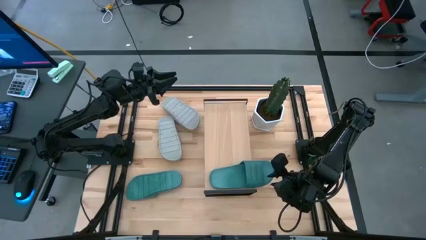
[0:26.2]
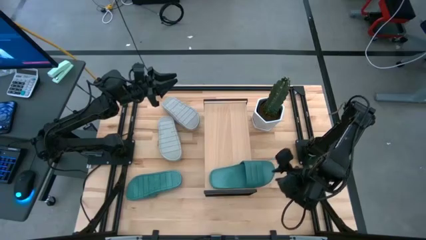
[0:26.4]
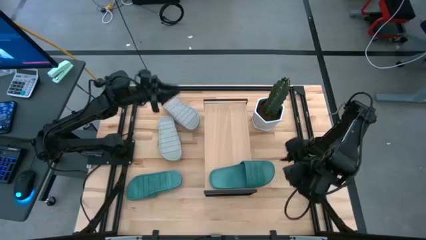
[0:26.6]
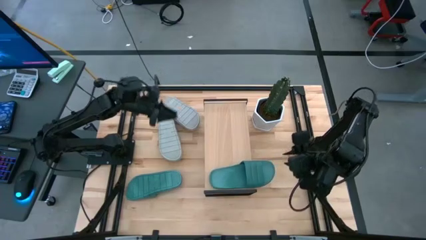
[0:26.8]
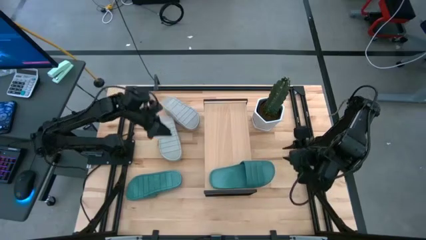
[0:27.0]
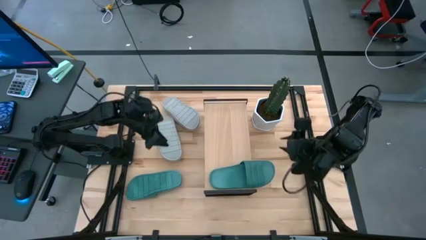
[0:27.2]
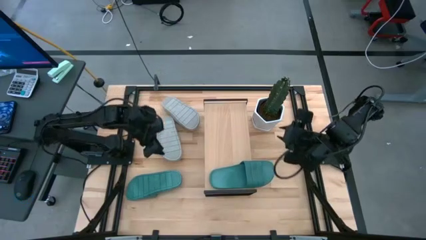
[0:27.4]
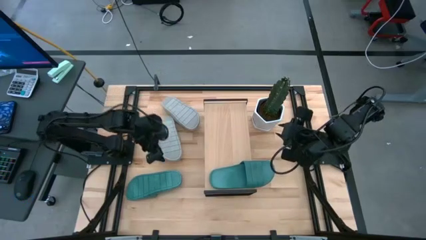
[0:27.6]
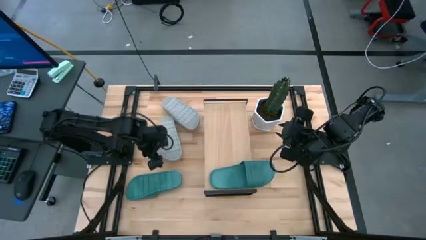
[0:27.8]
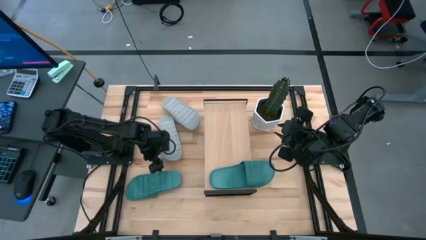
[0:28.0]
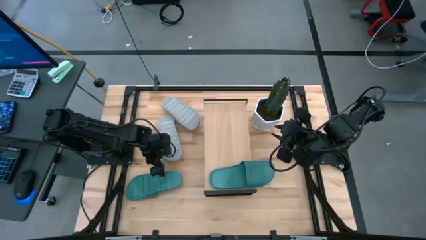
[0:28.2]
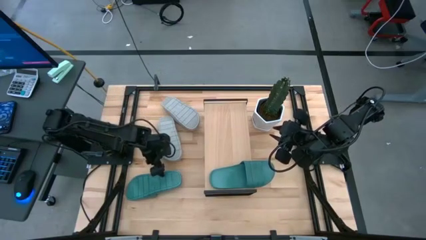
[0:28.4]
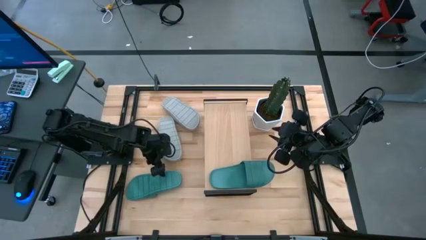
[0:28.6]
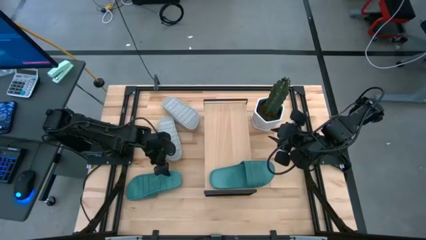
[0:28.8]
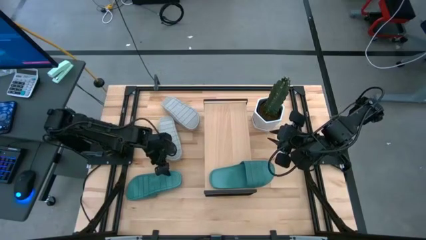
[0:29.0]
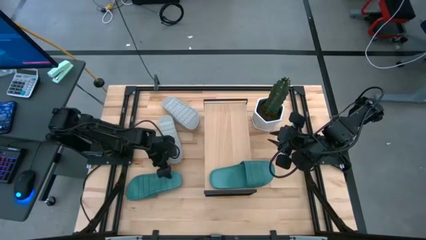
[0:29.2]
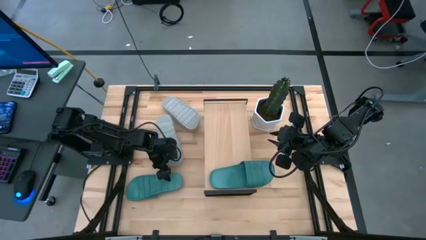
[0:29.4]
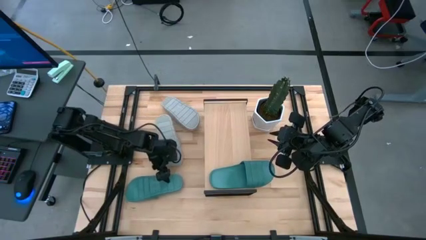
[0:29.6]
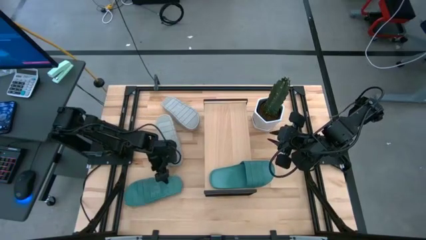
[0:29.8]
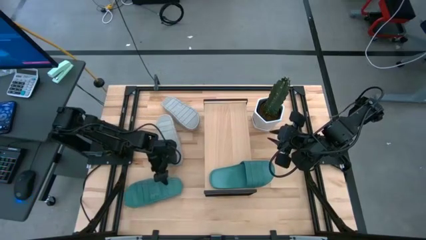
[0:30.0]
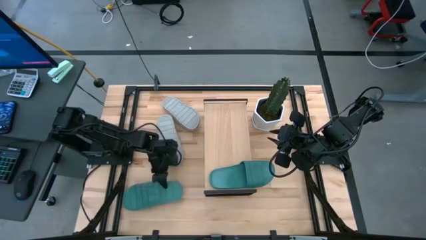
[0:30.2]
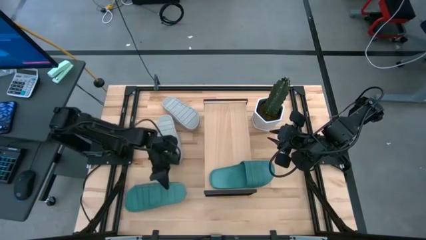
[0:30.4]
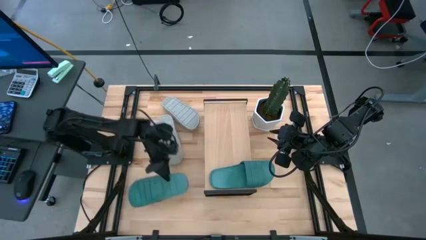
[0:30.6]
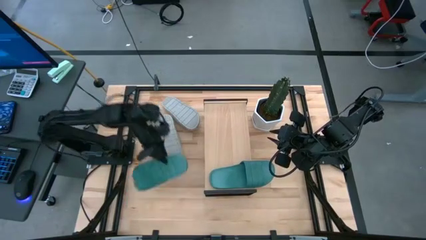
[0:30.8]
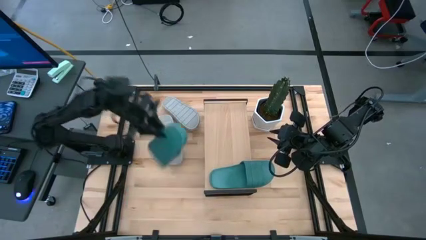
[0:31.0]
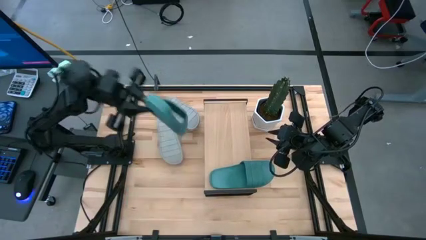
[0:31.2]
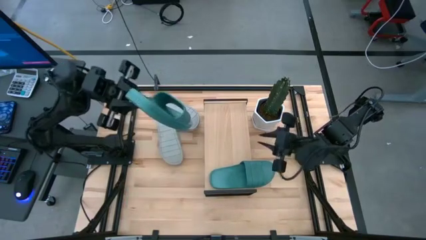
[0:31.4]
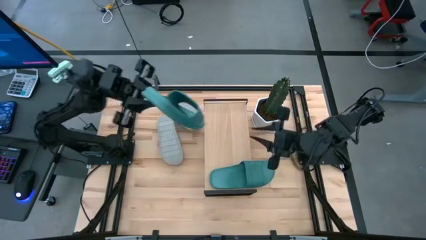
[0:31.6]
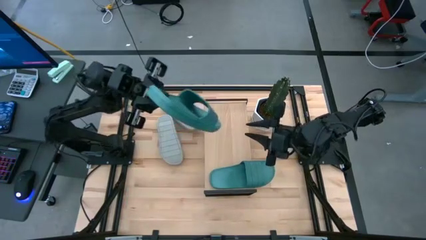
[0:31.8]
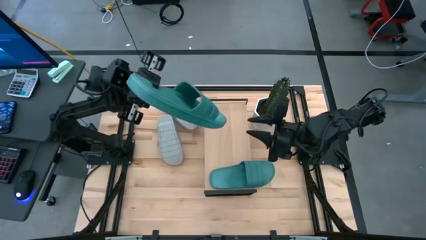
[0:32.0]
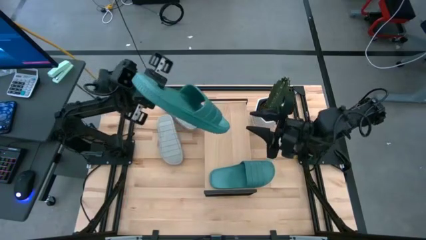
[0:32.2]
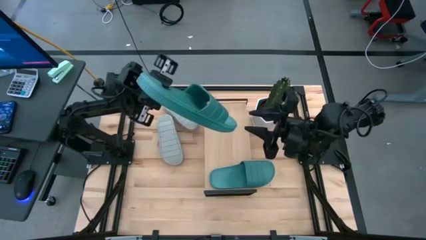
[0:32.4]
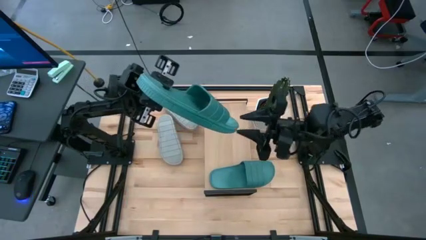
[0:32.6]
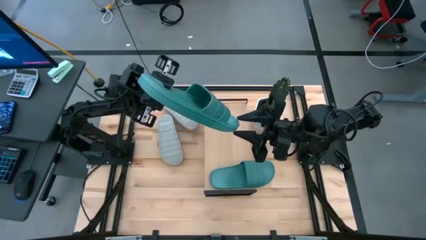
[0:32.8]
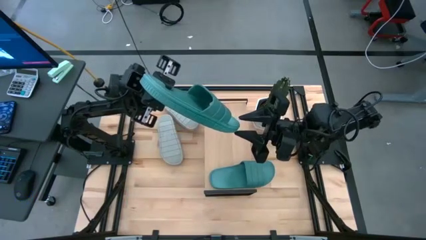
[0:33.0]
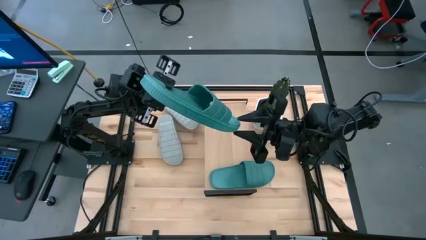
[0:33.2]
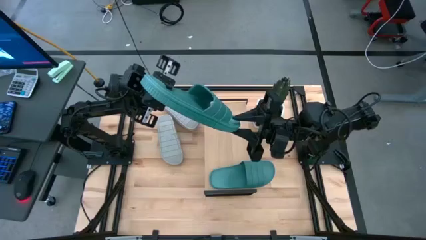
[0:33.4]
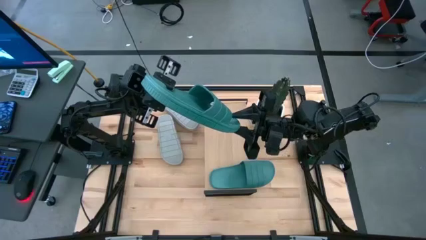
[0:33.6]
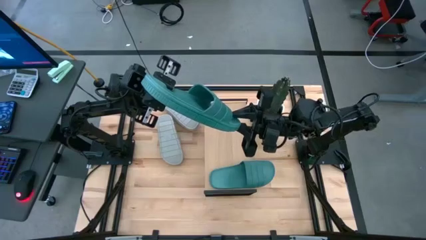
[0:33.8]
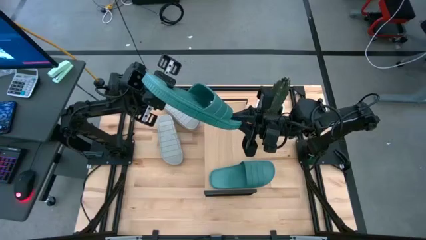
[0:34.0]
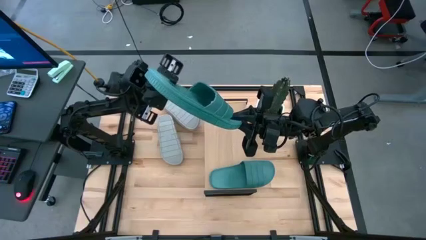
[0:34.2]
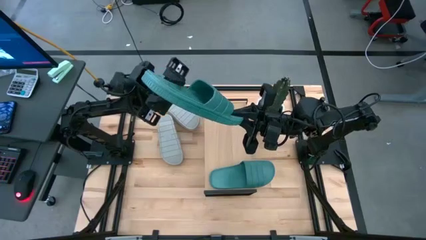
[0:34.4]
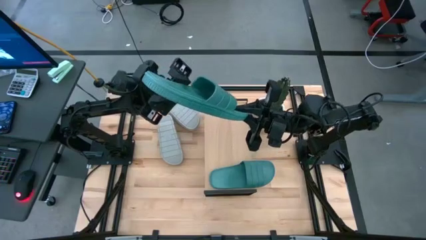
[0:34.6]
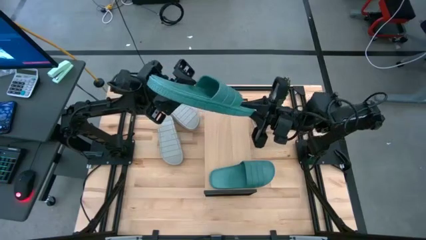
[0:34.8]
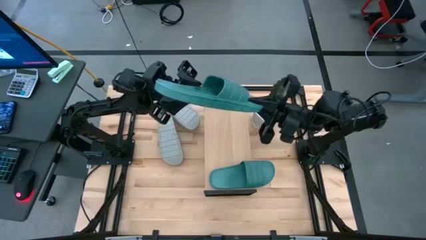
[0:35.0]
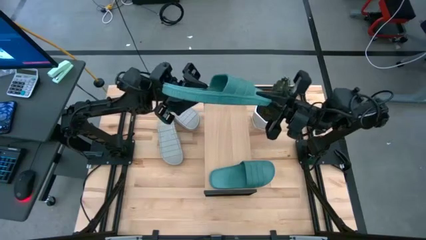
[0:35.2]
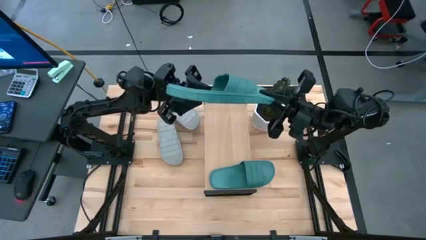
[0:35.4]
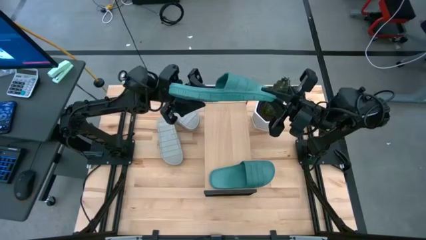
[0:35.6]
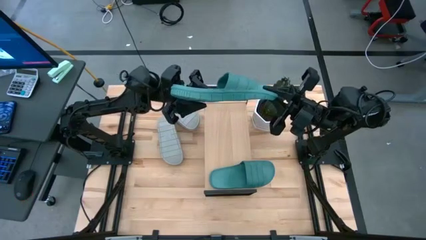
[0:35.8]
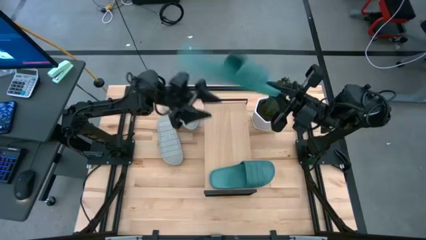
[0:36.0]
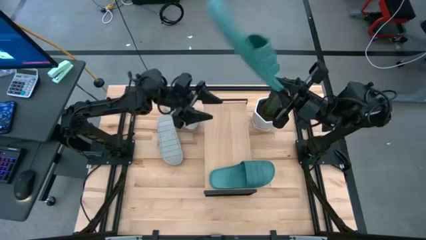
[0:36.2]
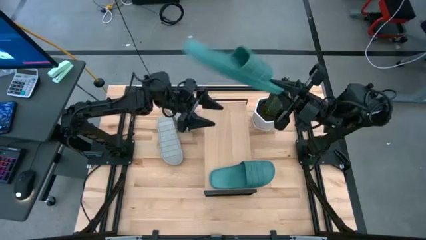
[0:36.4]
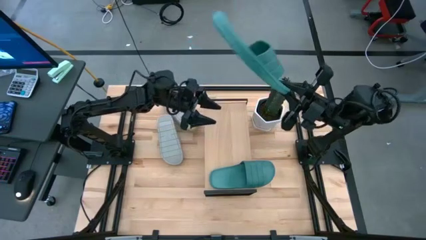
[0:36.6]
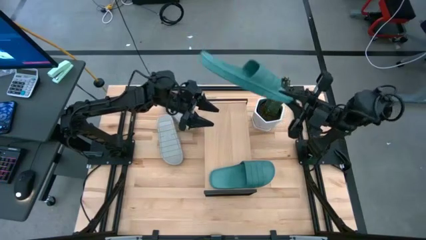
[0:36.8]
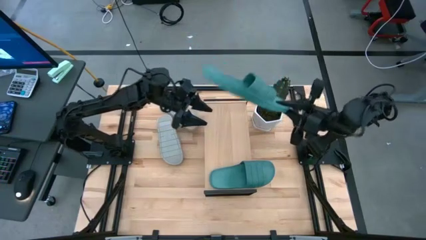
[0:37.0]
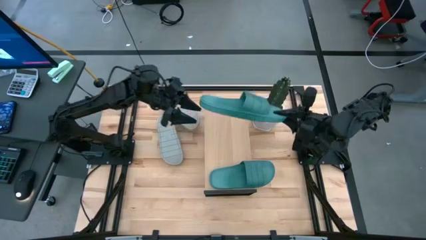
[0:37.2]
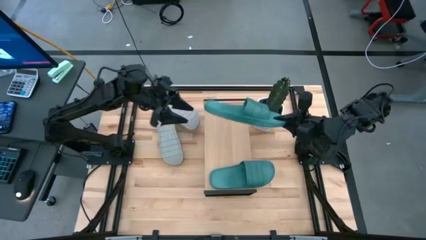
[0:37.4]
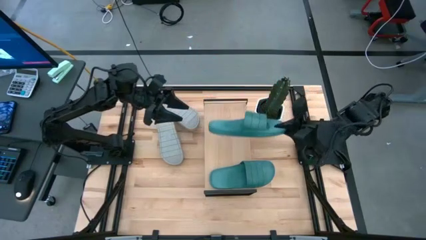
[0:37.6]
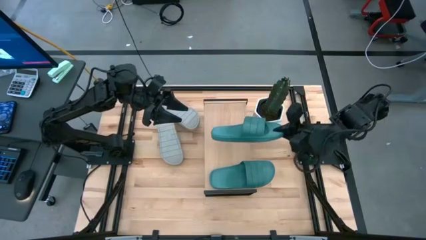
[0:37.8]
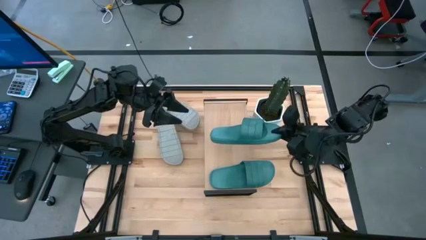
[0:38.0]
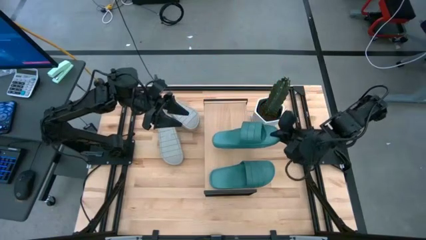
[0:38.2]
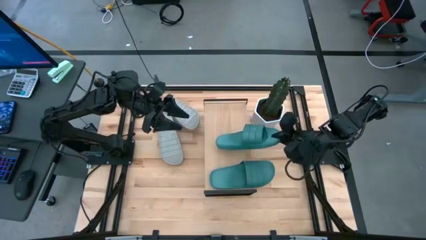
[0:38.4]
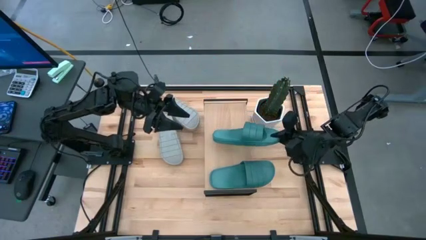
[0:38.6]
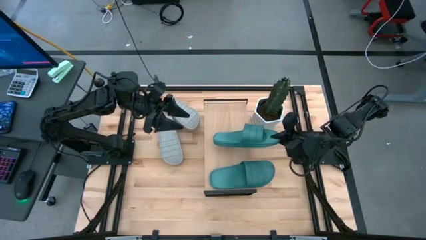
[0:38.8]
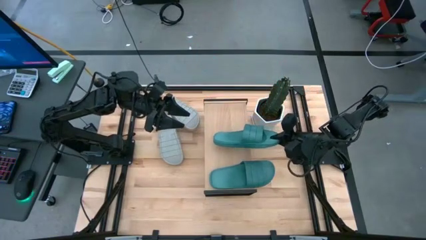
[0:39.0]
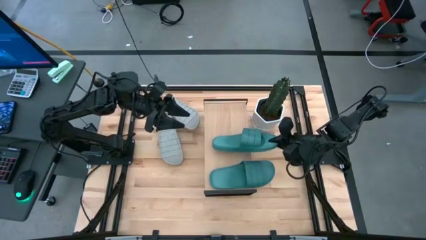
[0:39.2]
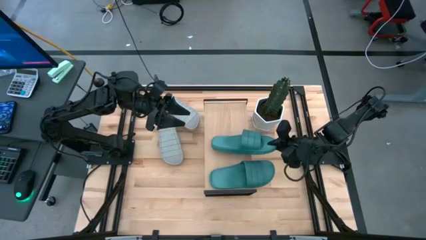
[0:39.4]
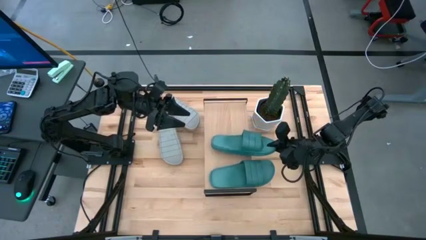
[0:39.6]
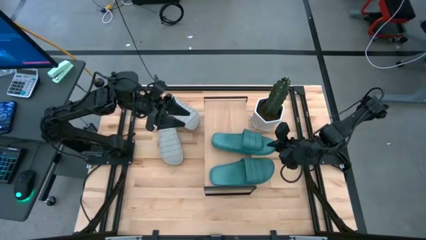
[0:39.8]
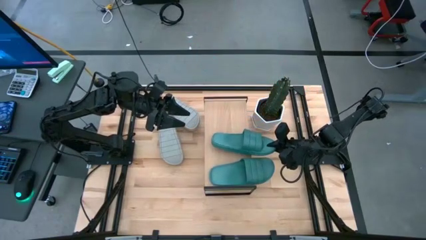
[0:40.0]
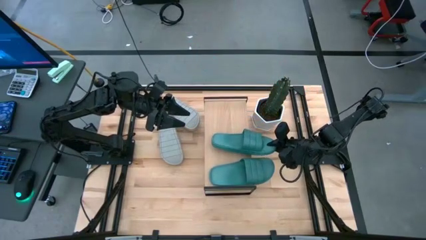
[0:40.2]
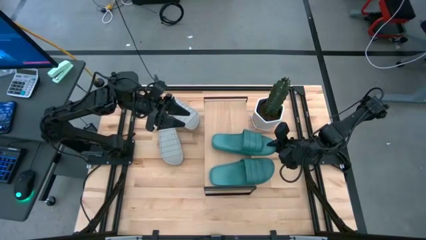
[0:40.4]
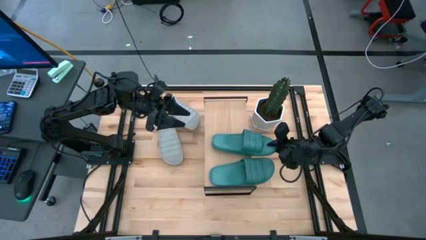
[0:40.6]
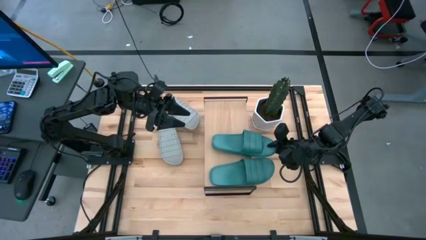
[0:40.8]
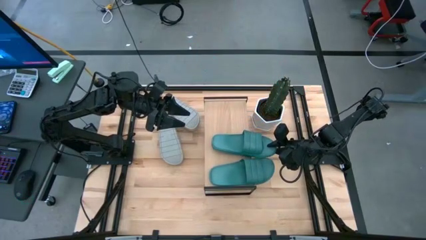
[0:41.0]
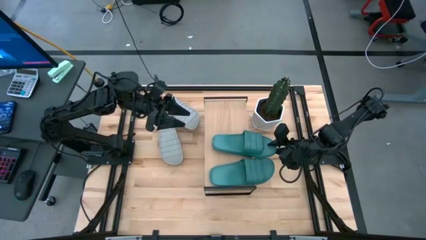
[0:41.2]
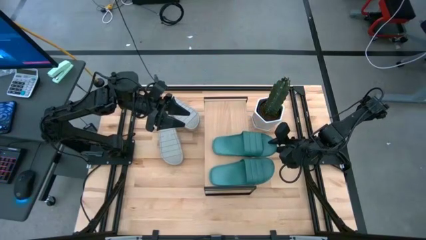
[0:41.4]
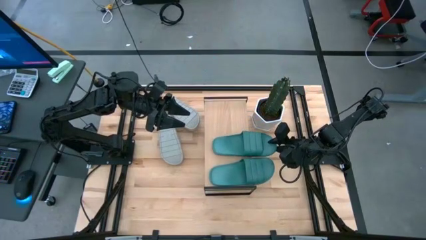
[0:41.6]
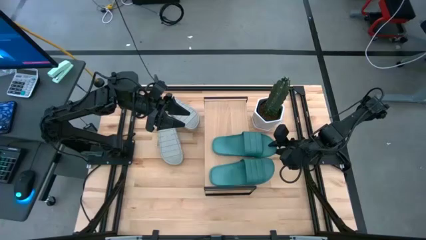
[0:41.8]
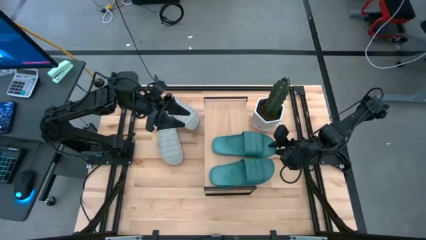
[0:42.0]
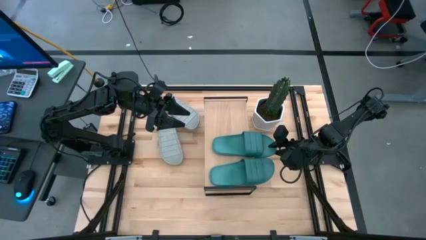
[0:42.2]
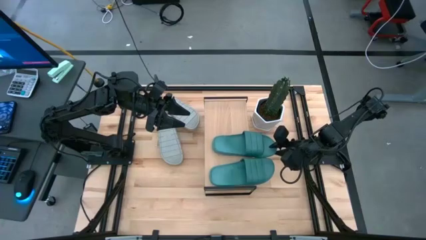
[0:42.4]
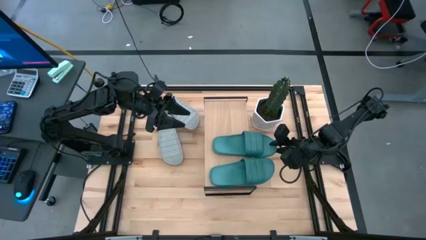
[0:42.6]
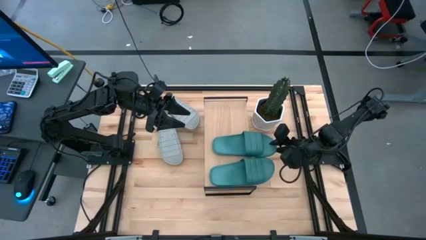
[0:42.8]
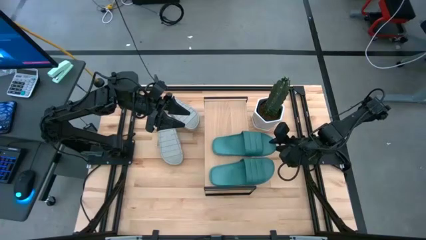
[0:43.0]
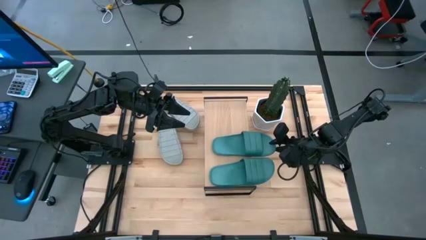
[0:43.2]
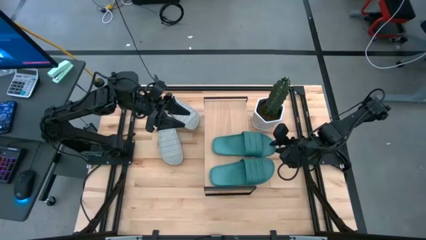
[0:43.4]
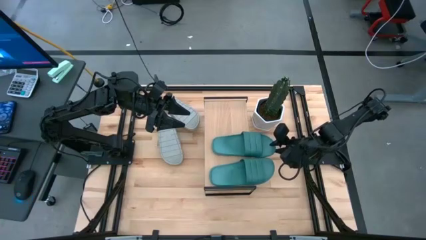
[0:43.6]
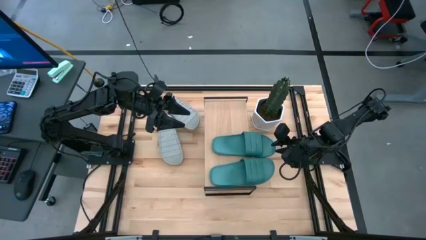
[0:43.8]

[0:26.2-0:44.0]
Task: Pick and place slides into the shelf
Put the green slide on the shelf
